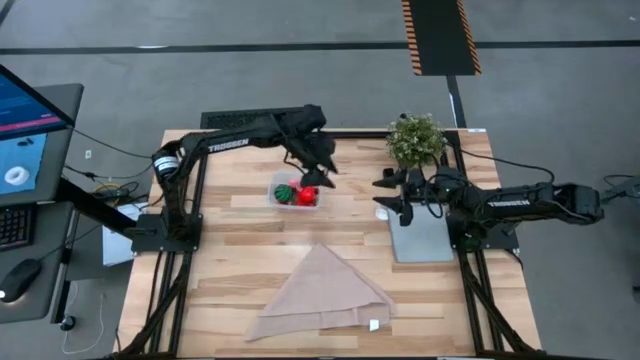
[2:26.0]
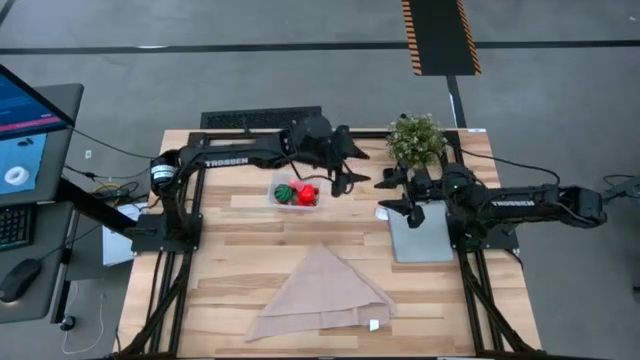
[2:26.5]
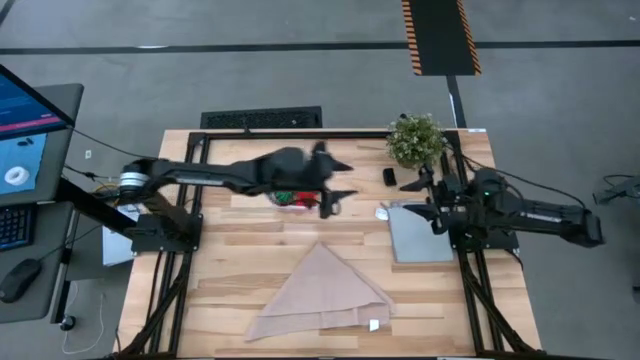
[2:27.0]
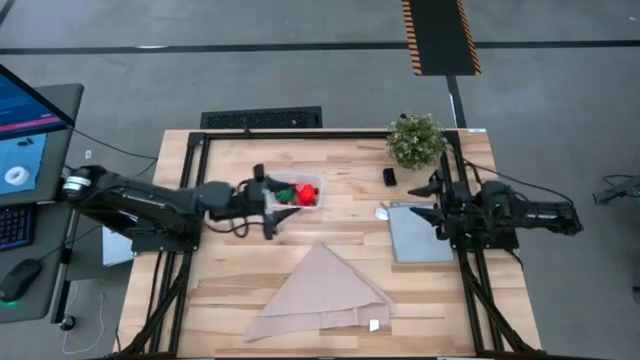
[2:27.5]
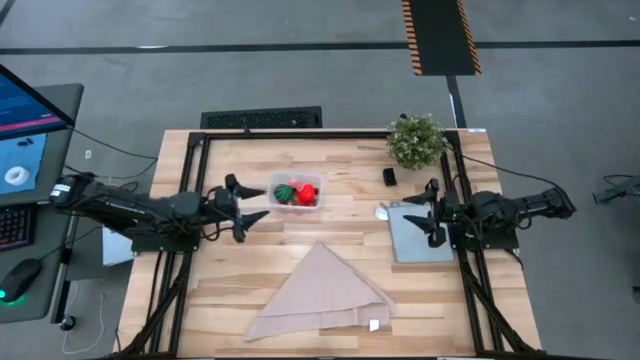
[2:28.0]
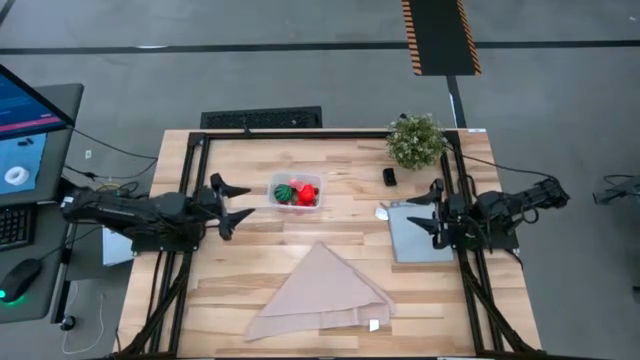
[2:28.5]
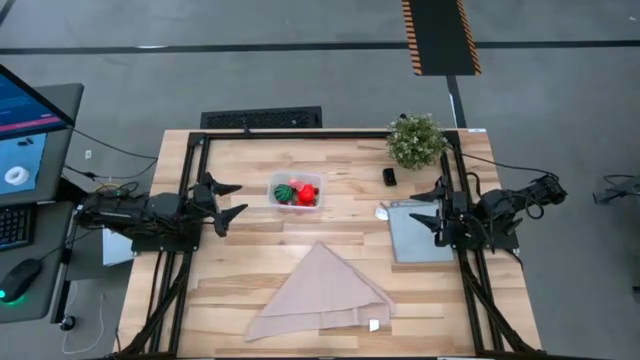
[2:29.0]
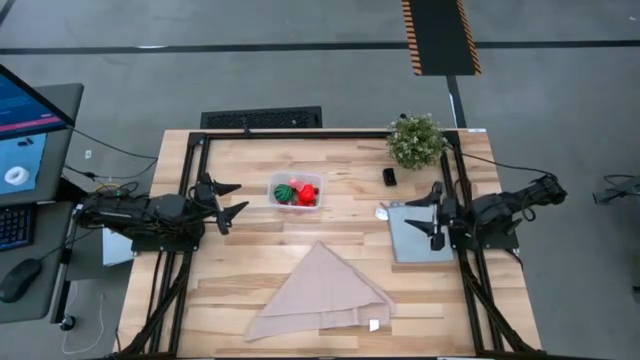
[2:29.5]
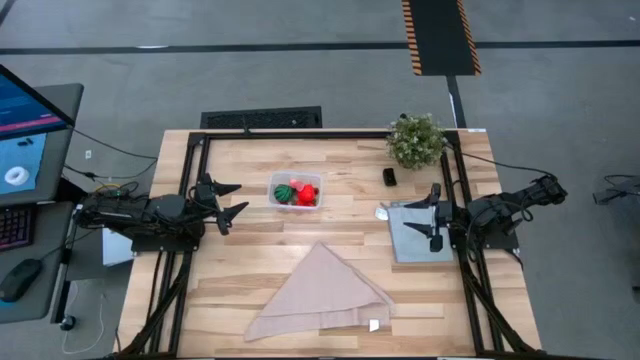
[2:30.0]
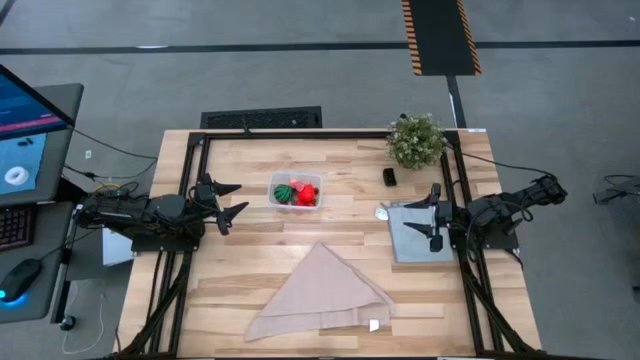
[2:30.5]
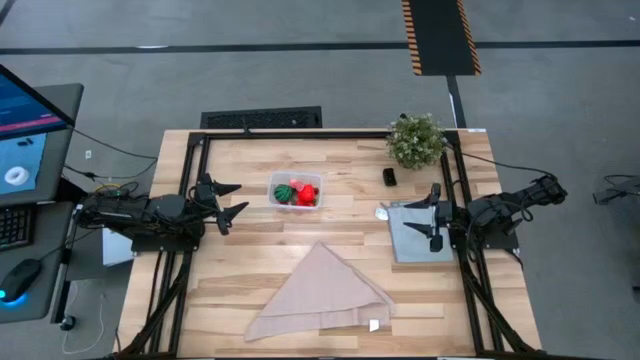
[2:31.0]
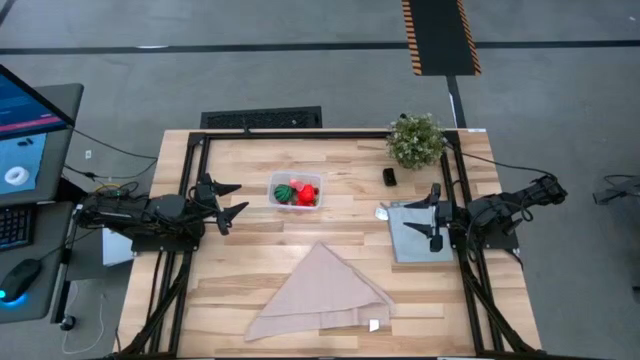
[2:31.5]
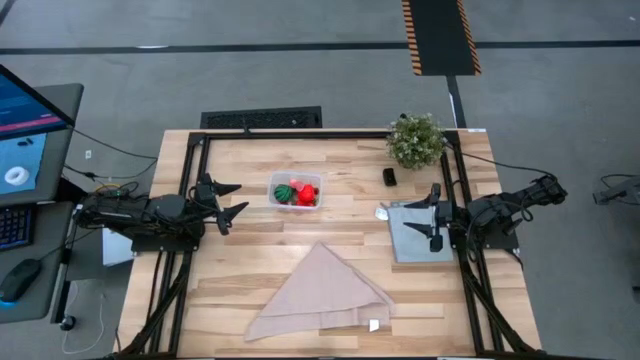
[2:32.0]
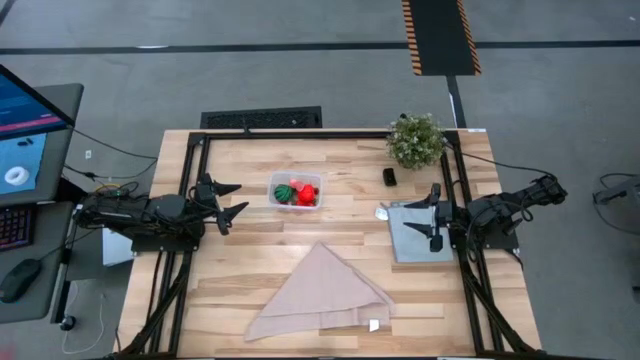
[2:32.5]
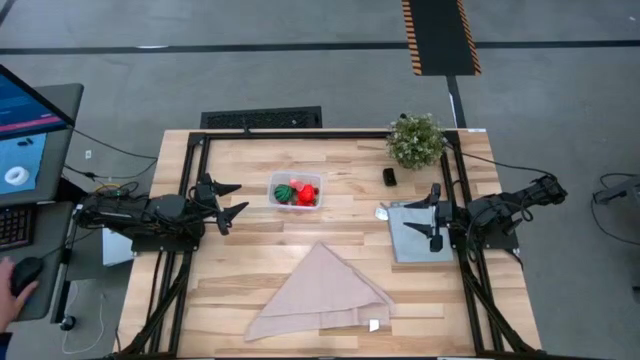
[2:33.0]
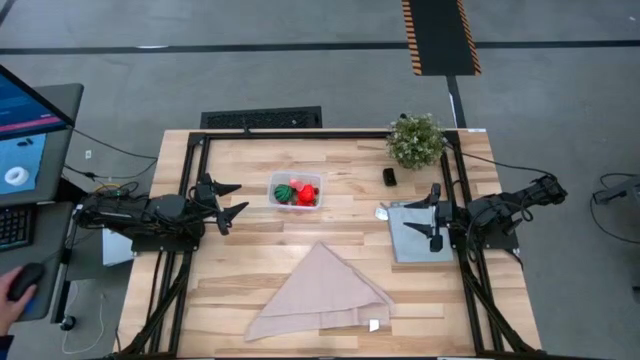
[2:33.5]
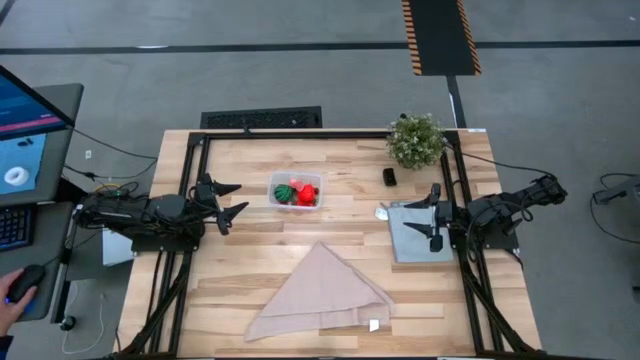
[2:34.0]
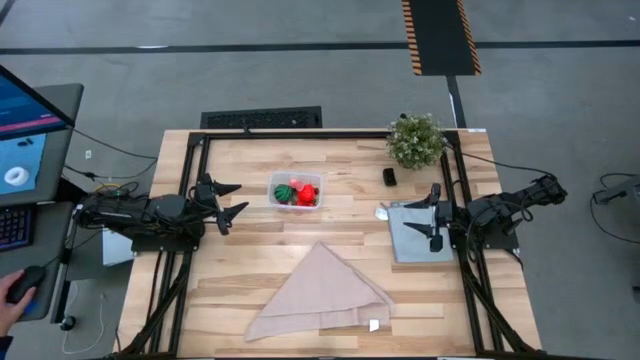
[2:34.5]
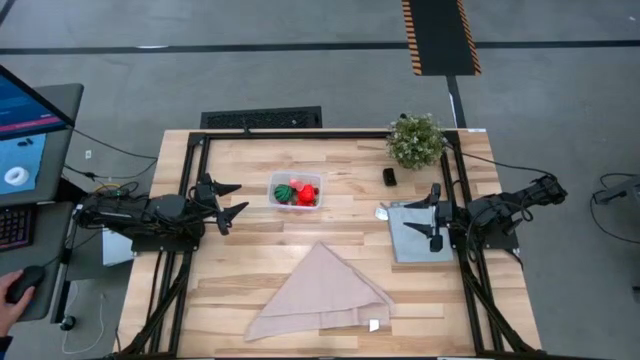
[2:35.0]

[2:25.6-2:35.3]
Task: Pick and placing Produce into tupperware
Return to Home Position

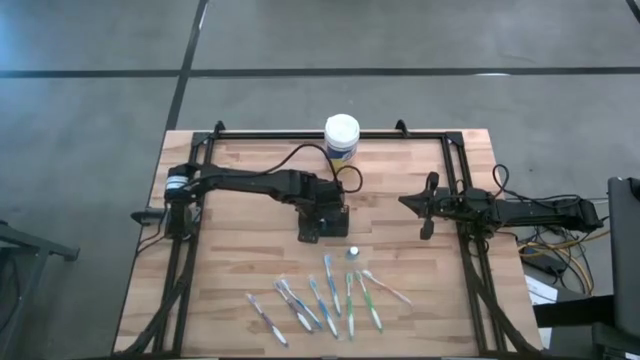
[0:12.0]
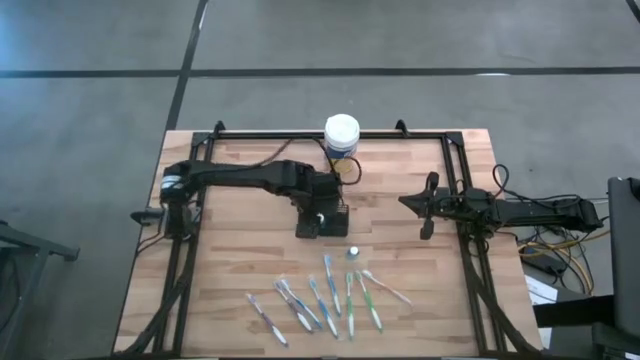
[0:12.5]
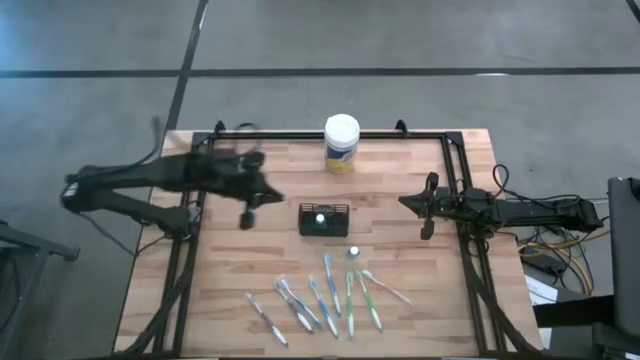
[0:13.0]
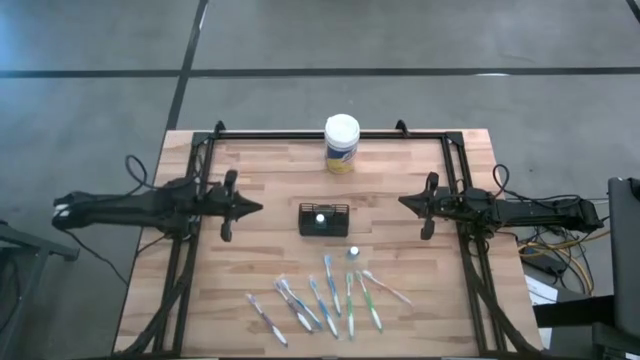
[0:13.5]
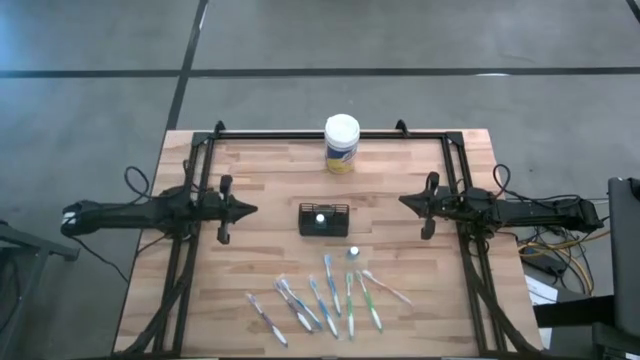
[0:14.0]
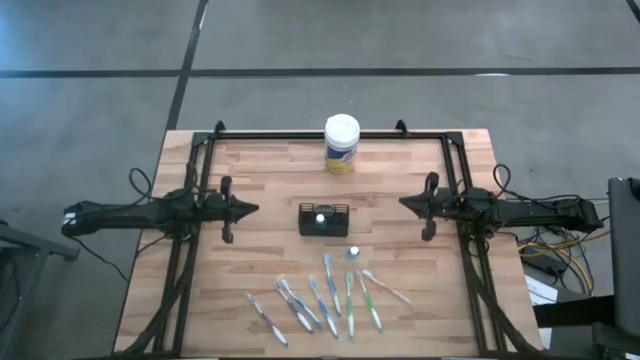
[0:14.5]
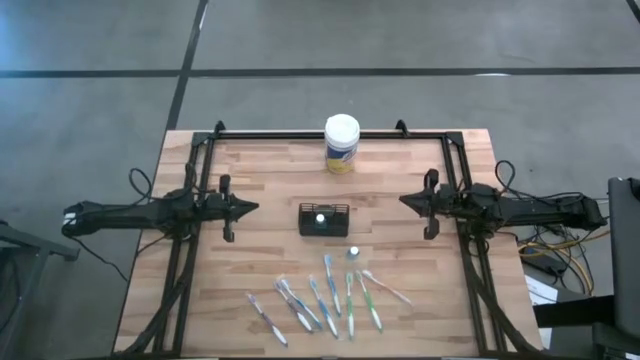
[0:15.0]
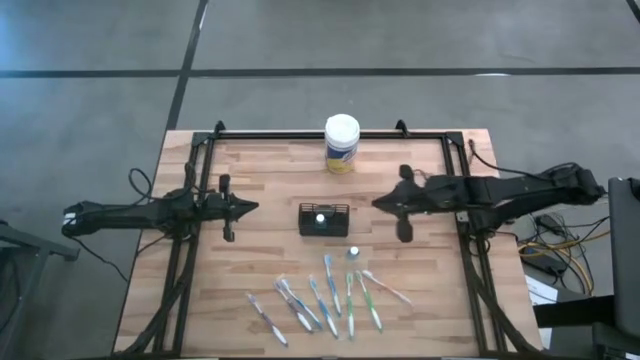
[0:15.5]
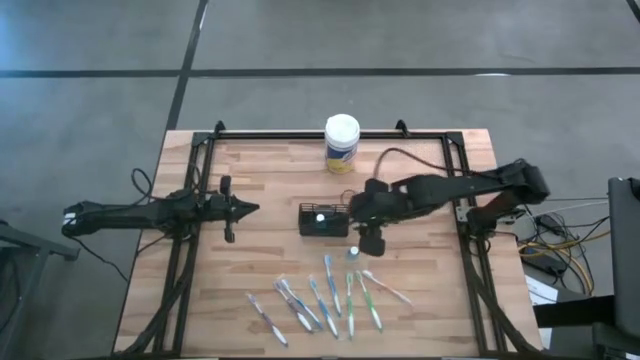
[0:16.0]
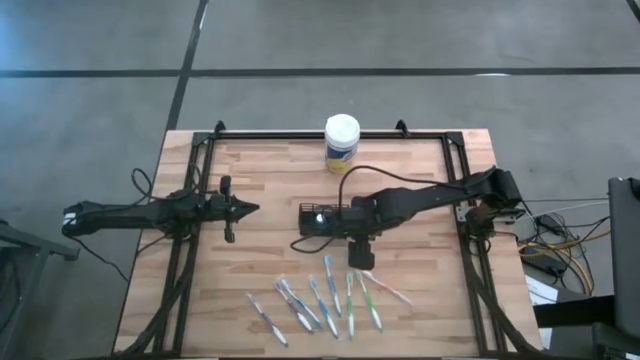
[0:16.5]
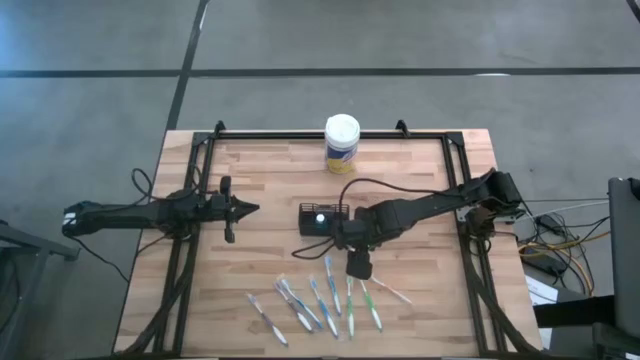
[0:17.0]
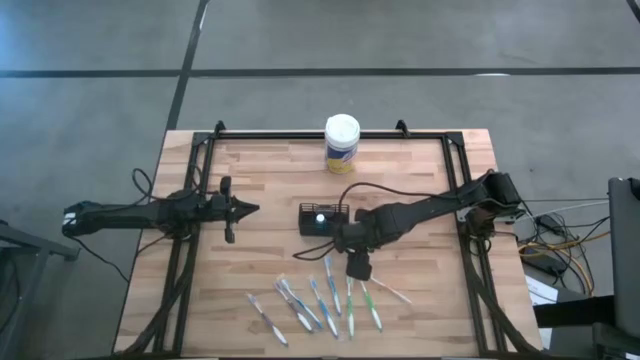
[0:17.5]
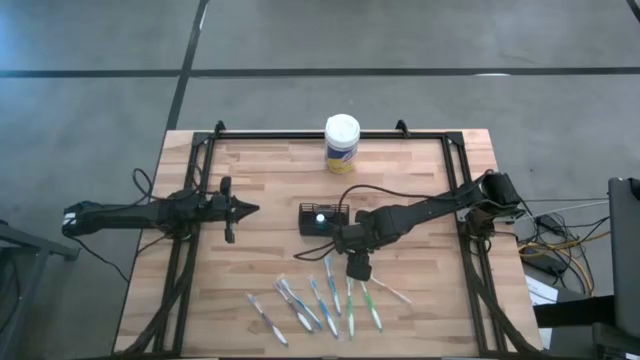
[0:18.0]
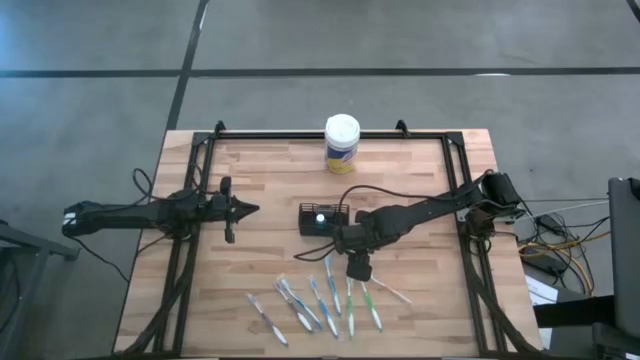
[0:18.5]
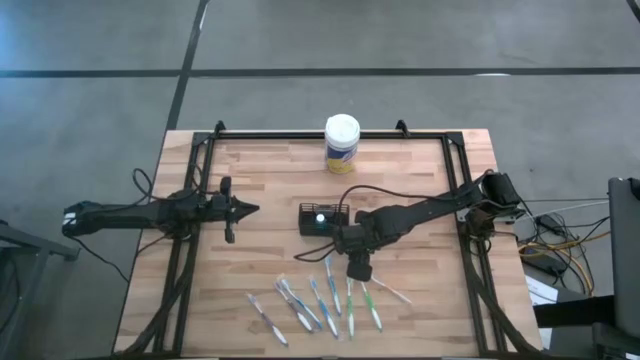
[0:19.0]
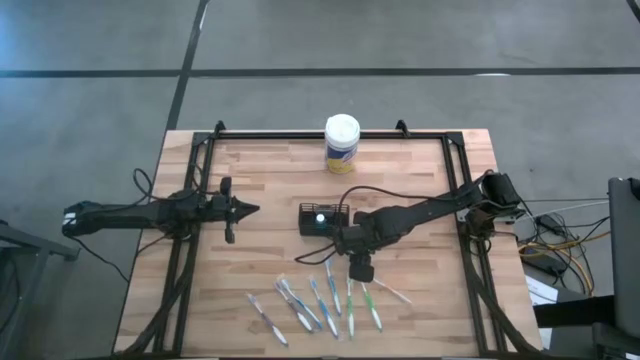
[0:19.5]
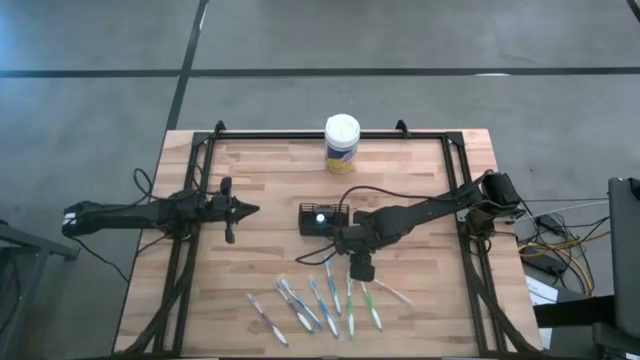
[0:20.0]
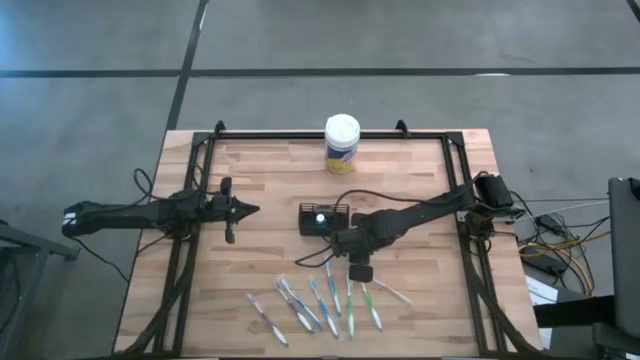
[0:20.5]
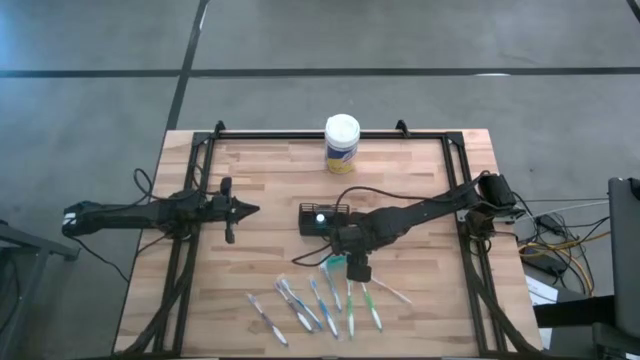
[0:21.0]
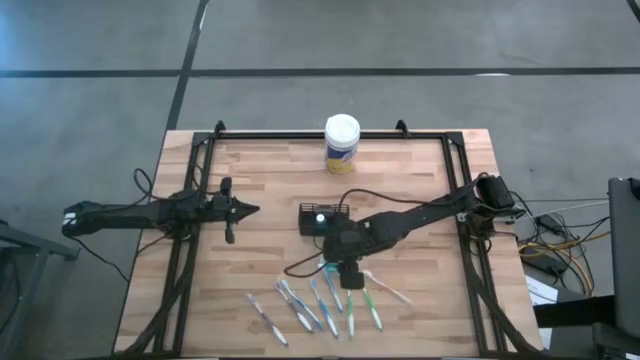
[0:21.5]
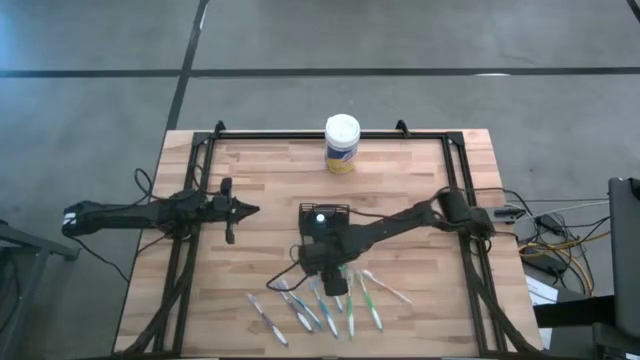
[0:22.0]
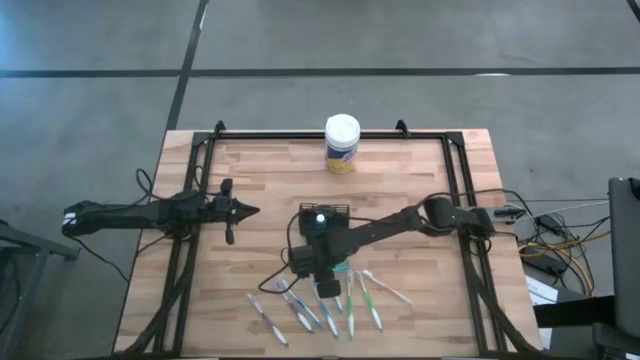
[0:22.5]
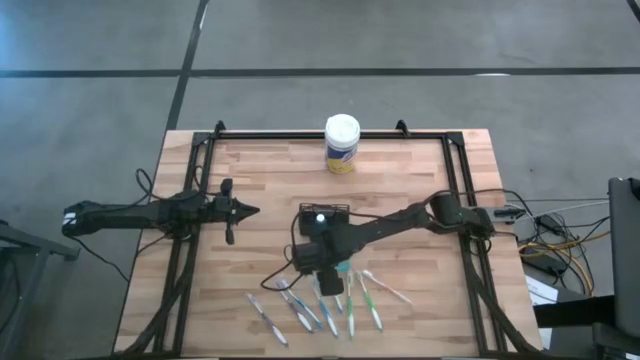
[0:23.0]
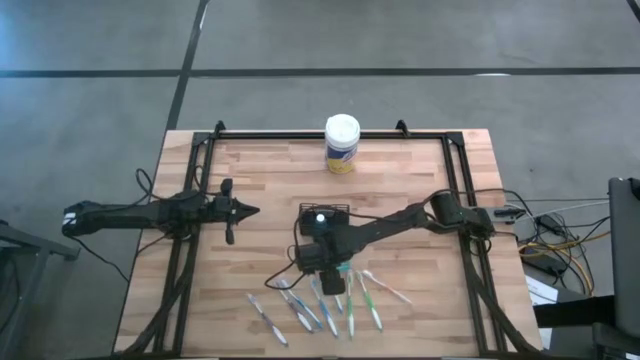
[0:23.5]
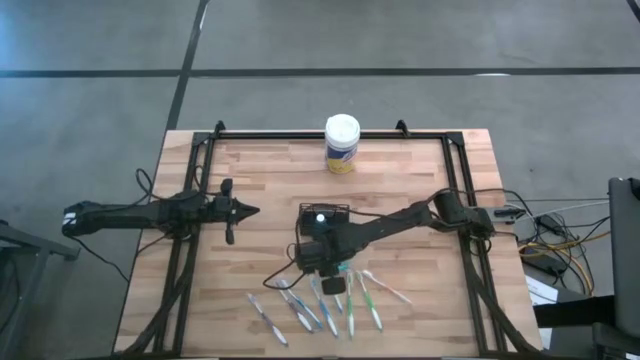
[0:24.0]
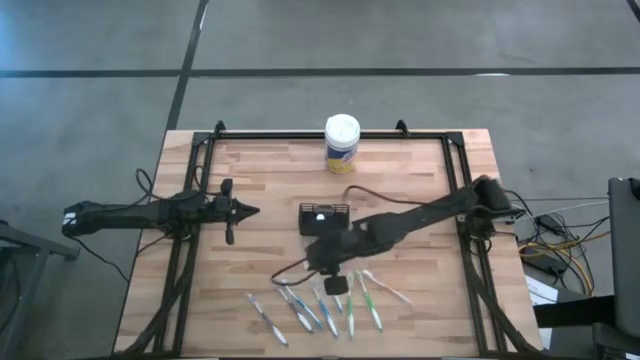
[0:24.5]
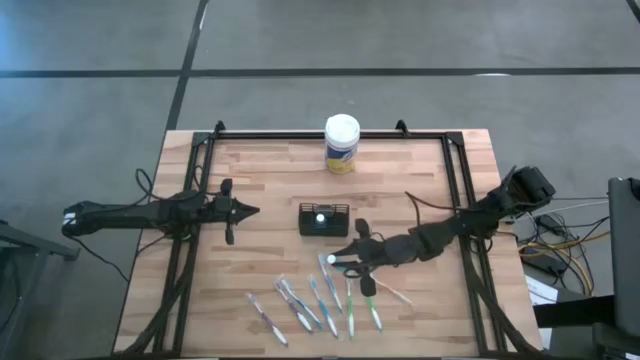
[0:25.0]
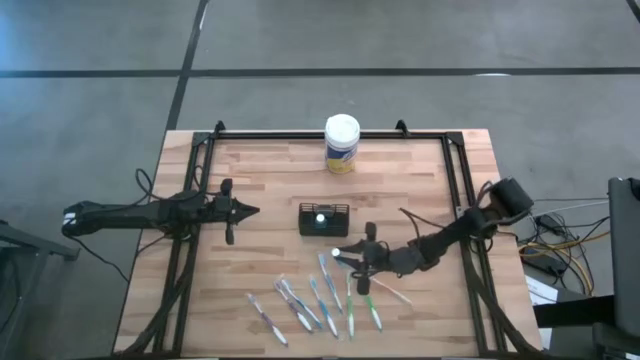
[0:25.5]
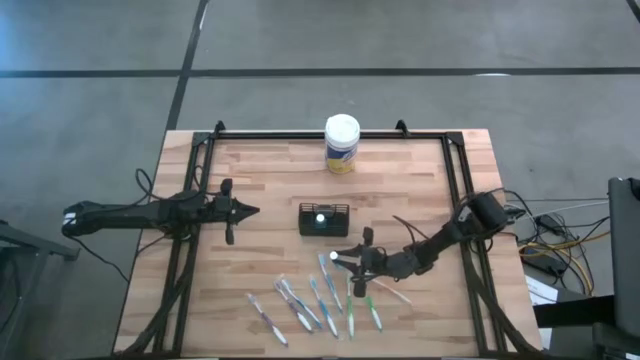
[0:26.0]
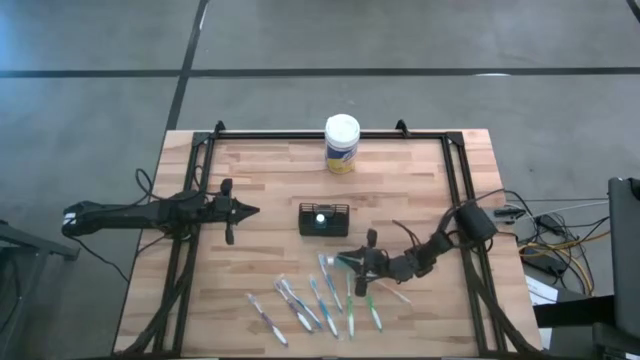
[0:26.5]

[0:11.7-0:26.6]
Task: Pick & Place toothbrushing station
Put the mouthwash into the wire organizer
